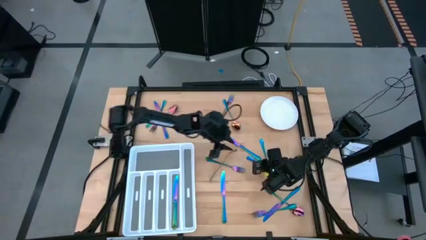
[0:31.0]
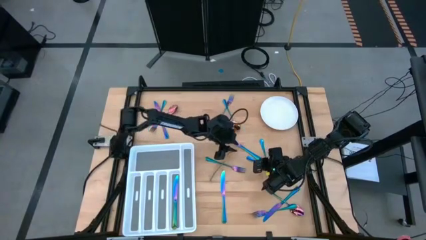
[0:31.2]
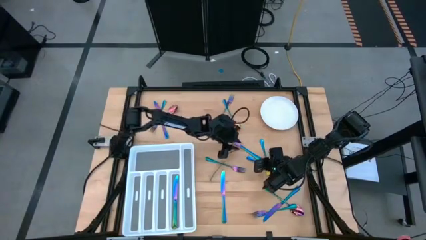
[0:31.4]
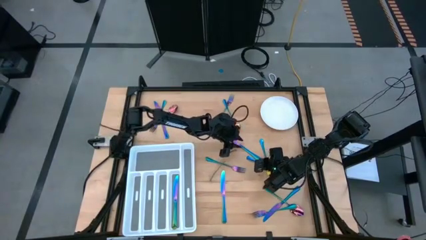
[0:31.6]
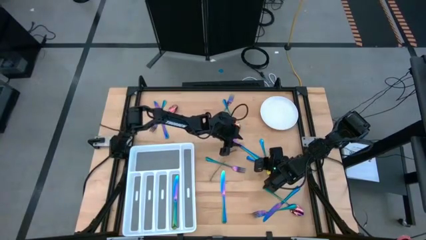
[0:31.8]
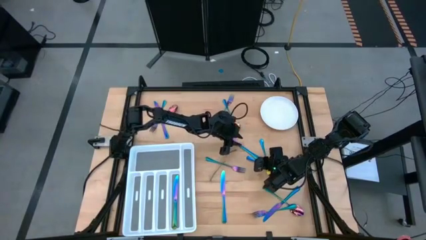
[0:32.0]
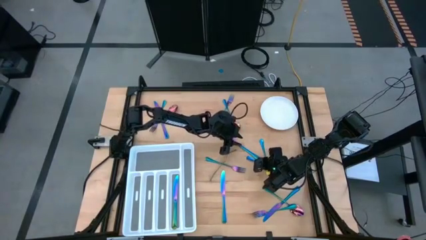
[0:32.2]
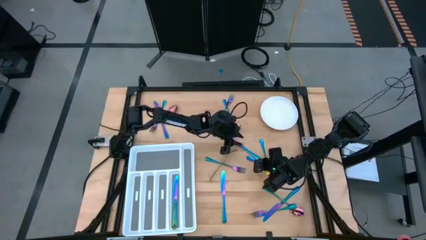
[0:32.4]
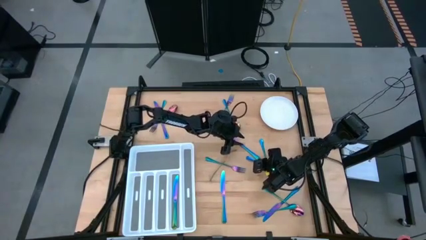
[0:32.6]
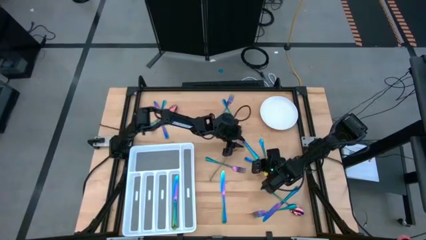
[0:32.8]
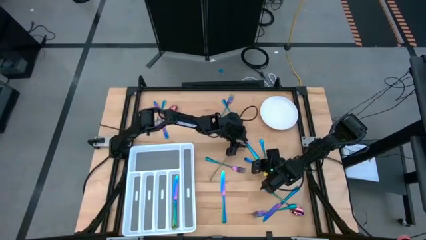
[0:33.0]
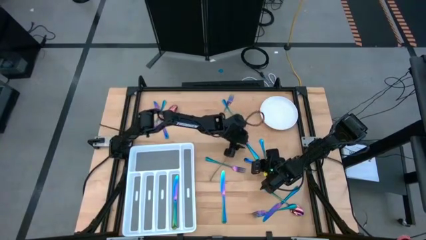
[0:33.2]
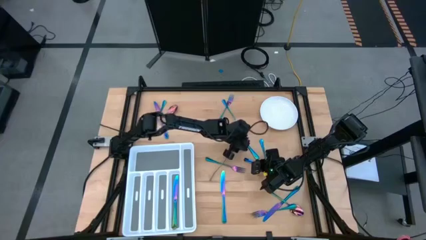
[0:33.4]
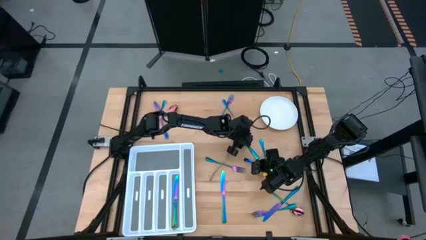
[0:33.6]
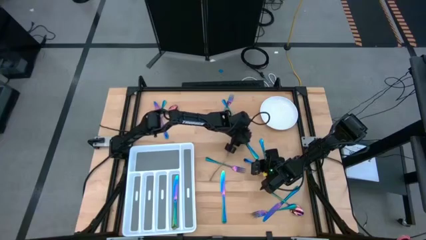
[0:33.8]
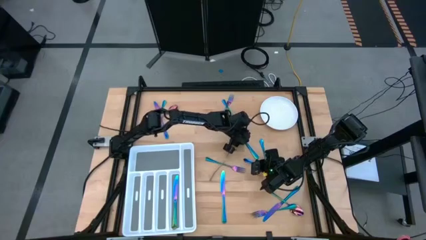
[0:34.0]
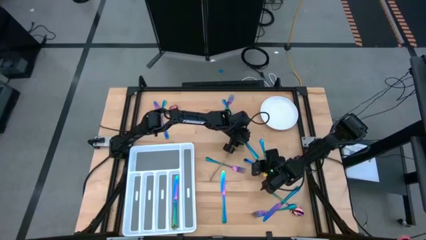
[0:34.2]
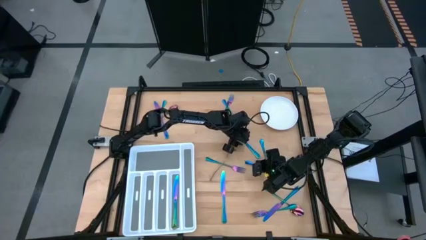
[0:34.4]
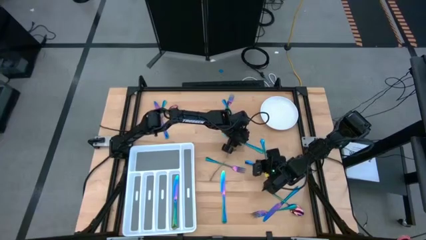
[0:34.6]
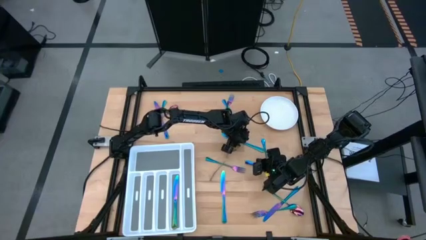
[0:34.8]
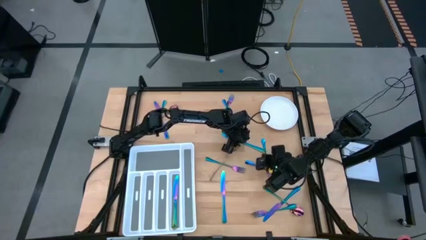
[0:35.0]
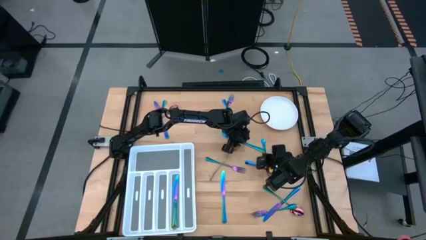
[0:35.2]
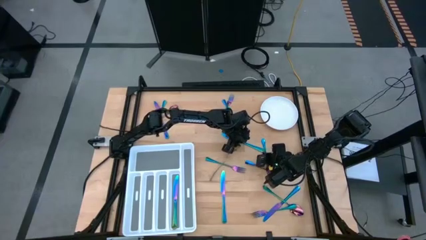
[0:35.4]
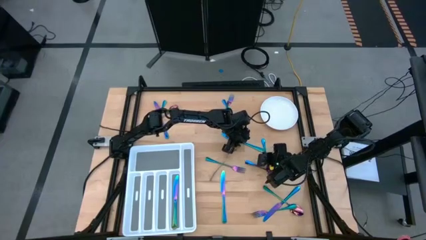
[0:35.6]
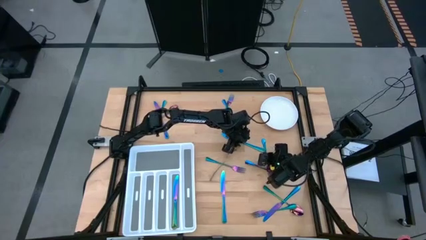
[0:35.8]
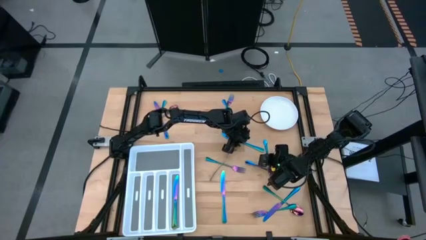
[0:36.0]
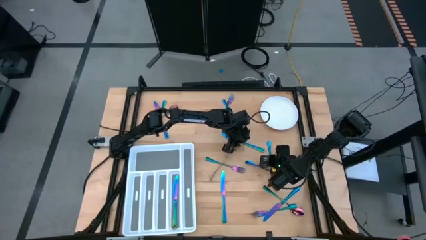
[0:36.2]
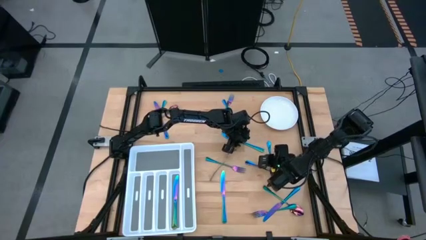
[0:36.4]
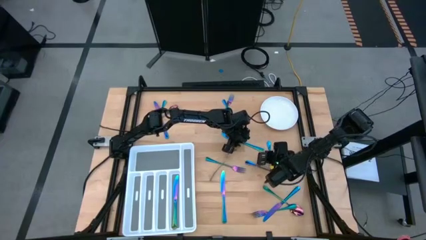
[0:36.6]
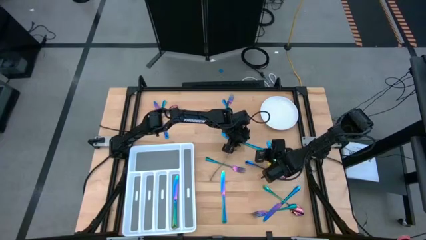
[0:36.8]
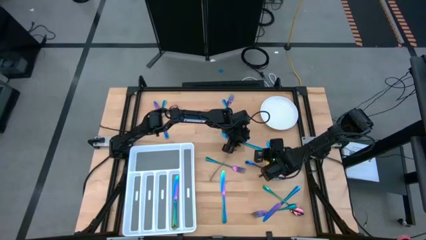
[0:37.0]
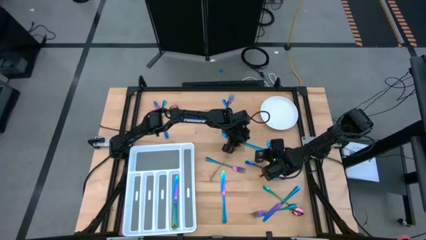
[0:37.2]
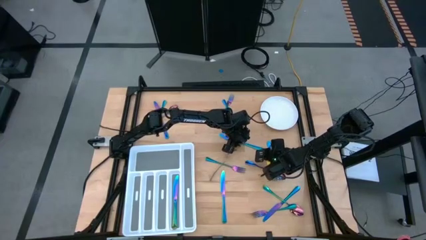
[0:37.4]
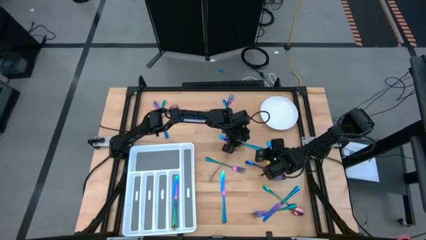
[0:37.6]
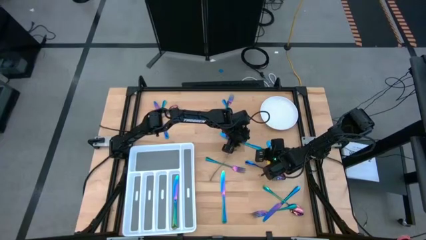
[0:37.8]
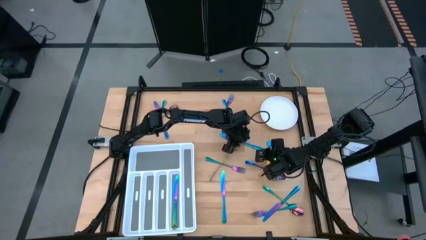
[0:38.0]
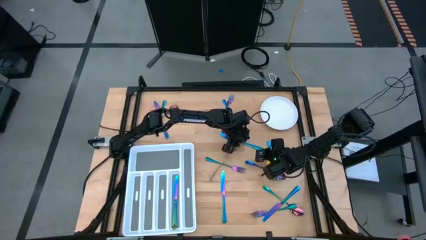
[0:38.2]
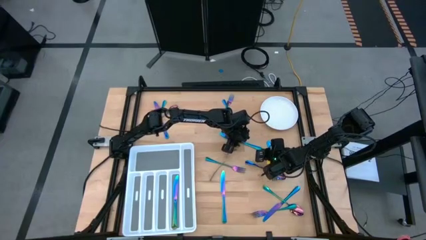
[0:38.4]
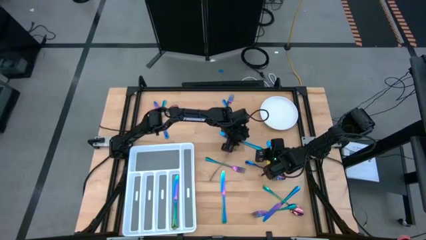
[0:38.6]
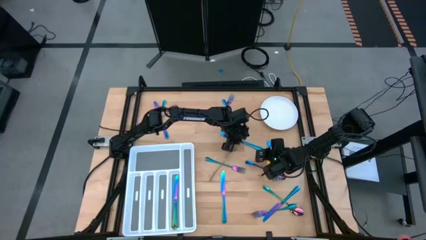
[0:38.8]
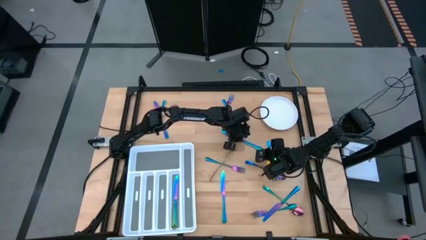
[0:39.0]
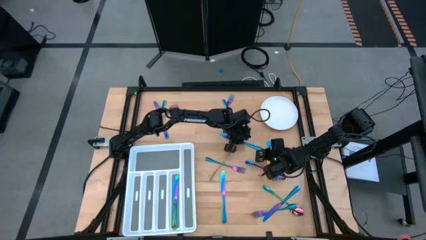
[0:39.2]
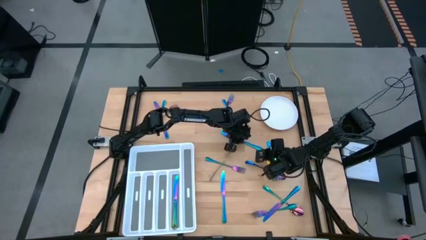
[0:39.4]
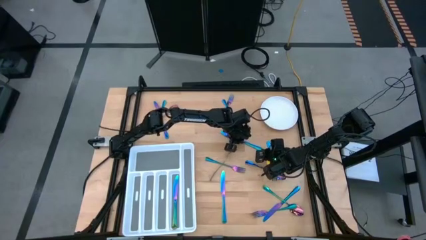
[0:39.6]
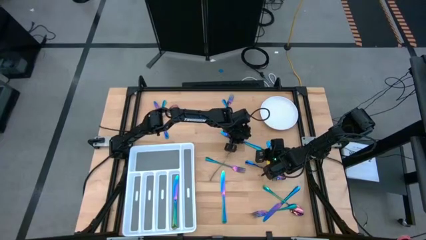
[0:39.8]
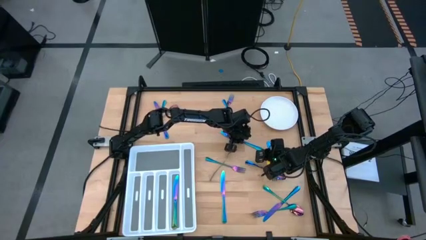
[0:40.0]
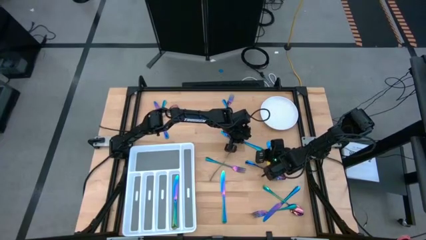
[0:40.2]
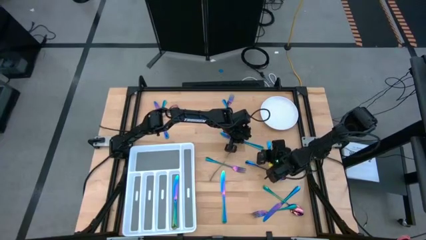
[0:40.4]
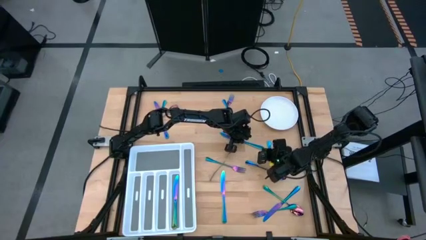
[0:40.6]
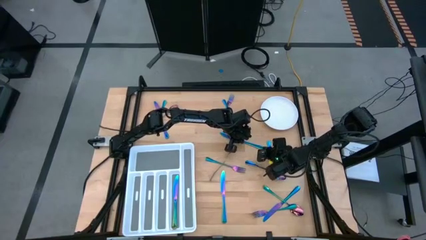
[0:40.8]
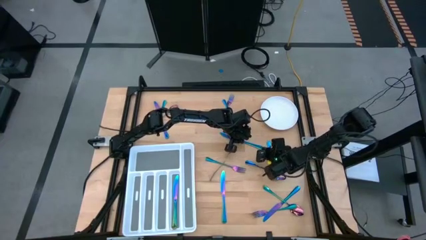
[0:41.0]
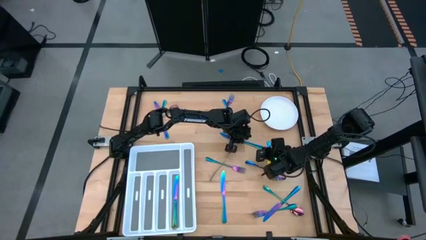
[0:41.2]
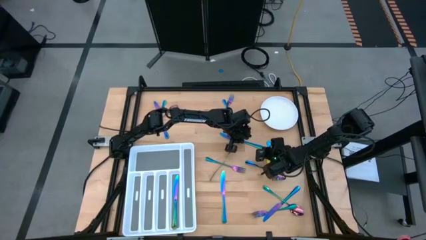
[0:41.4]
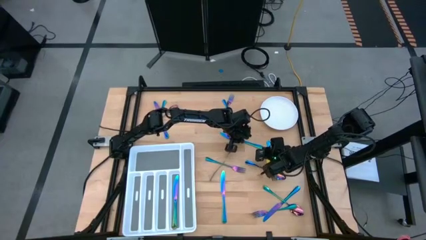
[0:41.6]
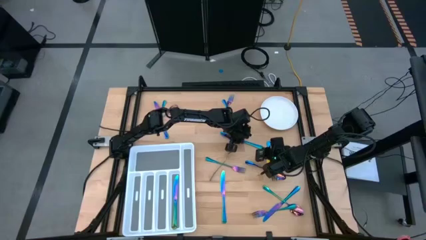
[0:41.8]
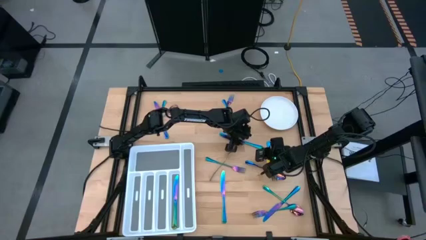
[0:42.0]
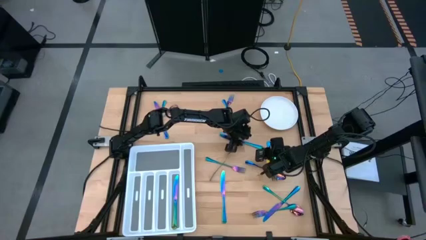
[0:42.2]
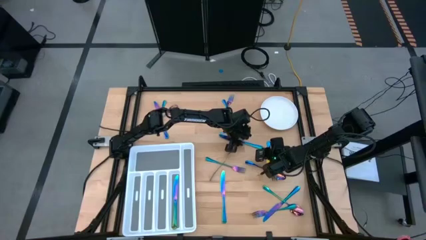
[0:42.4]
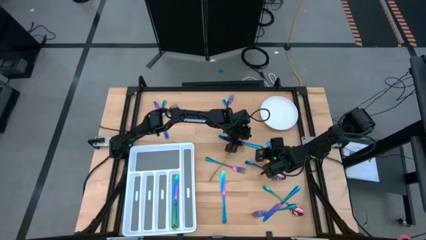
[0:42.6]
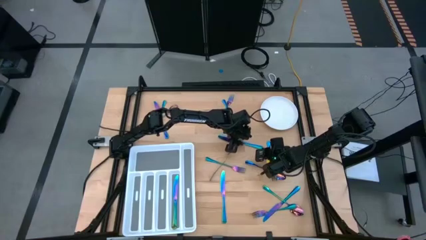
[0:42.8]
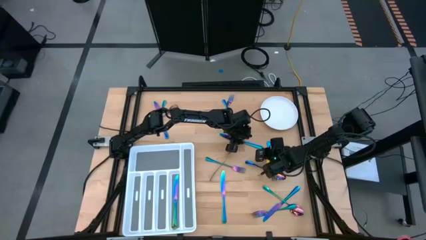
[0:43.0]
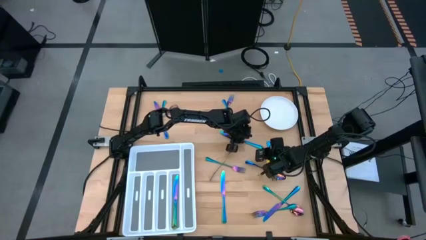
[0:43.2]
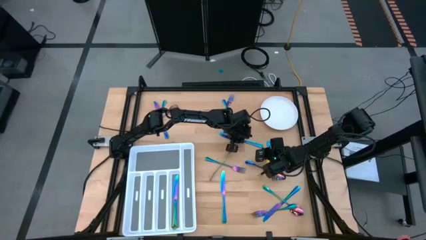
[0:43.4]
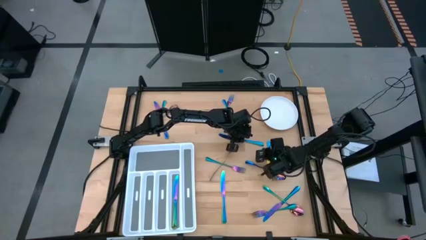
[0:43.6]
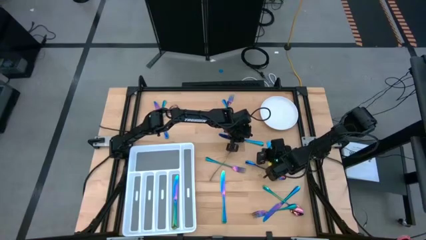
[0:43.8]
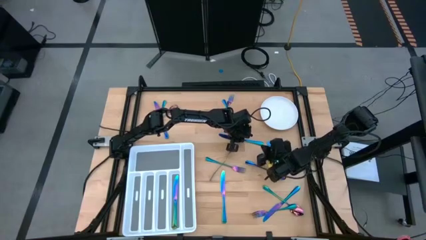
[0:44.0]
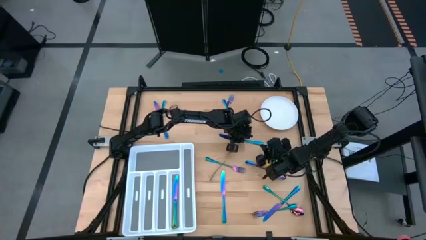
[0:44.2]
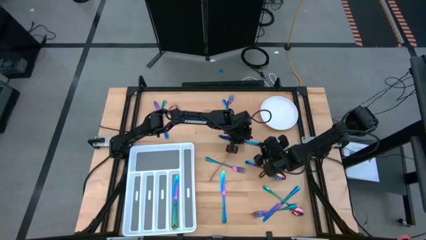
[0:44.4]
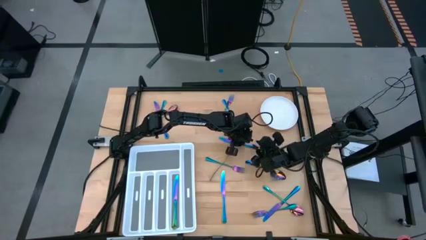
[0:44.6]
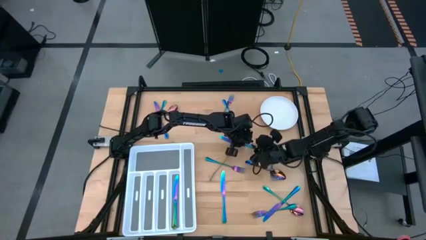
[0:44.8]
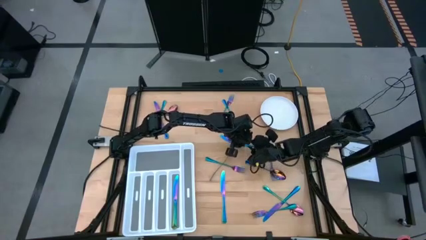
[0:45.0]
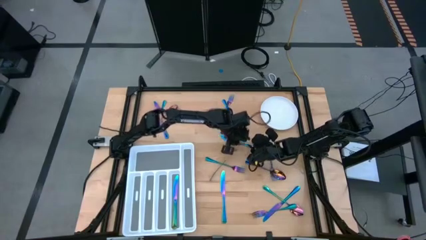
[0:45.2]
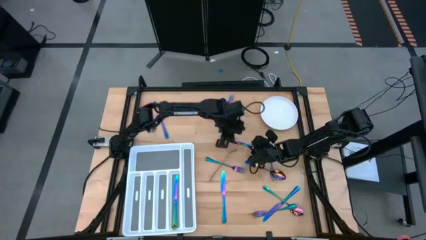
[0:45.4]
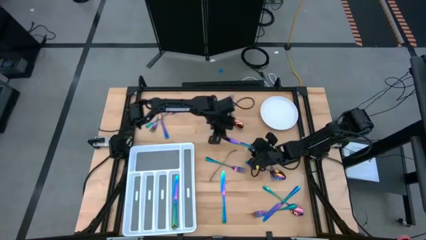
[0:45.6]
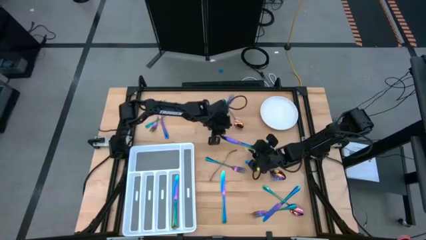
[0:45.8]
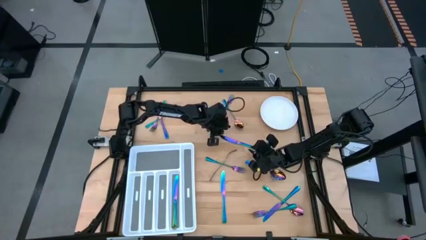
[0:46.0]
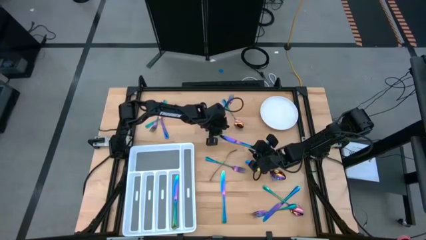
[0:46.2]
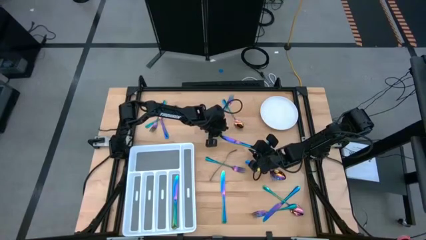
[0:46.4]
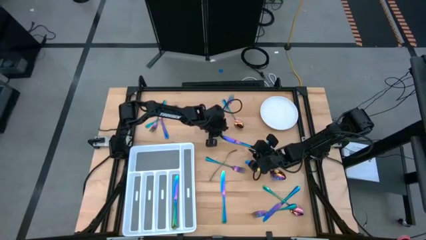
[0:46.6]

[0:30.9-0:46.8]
Task: Sort silverware
Put the top right iridescent knife into the cutlery tray

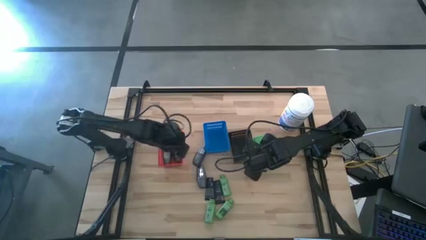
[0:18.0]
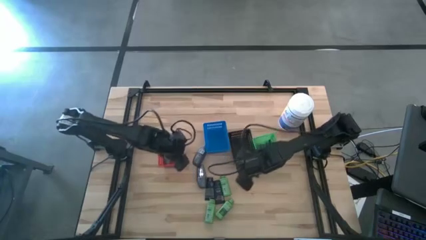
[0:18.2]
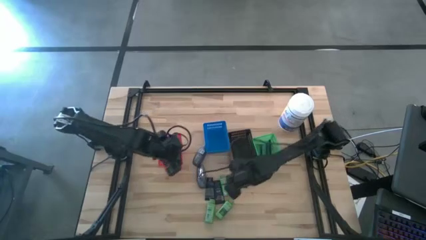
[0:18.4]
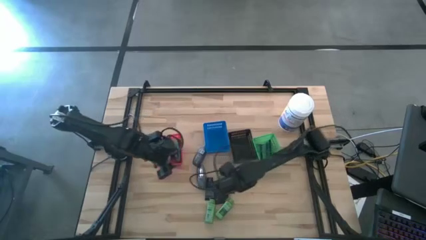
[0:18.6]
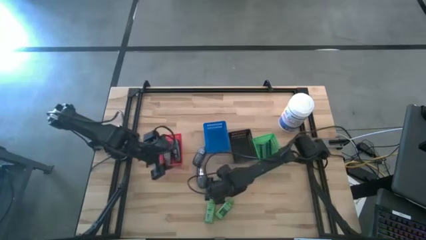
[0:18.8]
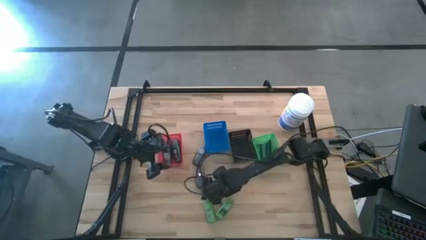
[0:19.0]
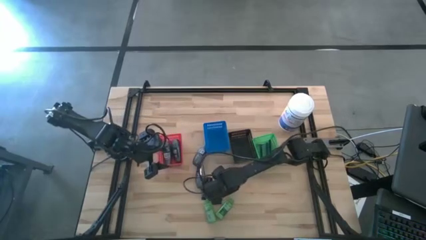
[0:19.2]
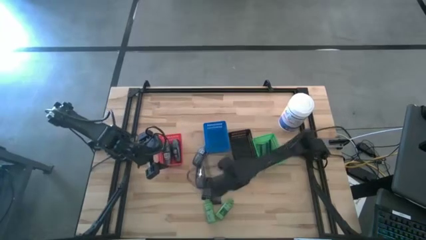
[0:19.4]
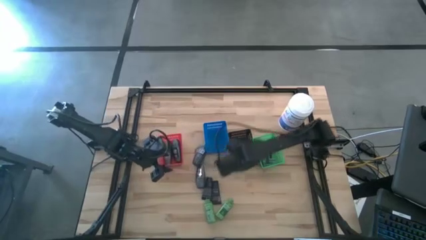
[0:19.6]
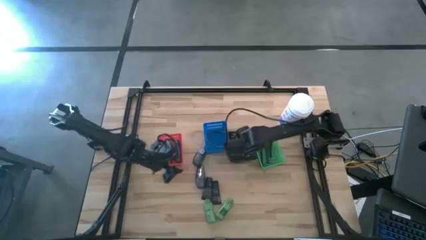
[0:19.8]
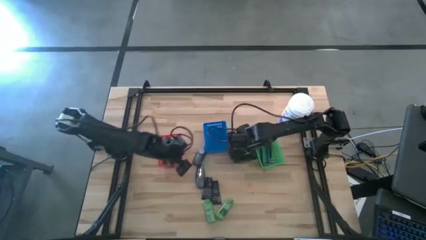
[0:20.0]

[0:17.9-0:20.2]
Task: Pick & Place Travel size toiletries
Put the green shampoo into the black bin
